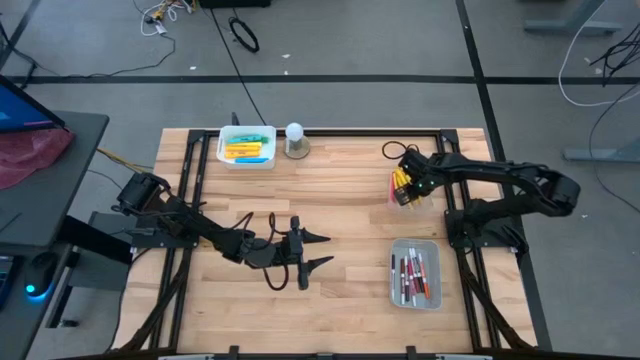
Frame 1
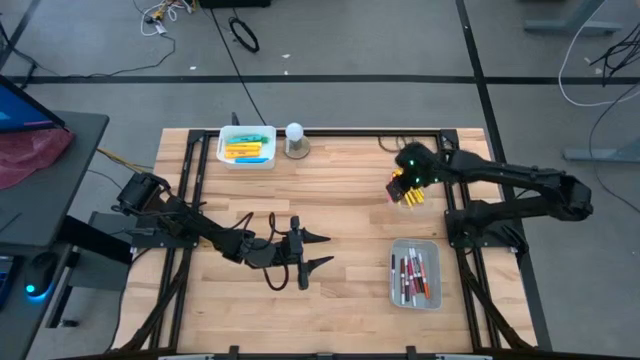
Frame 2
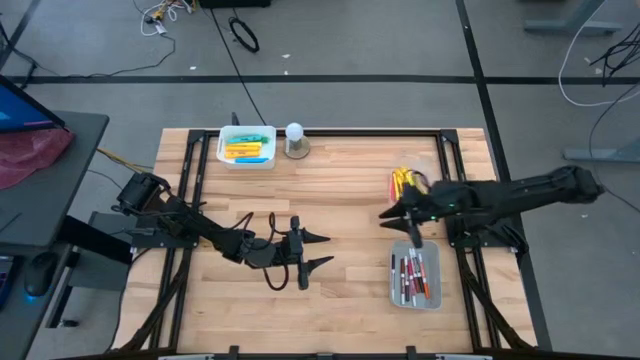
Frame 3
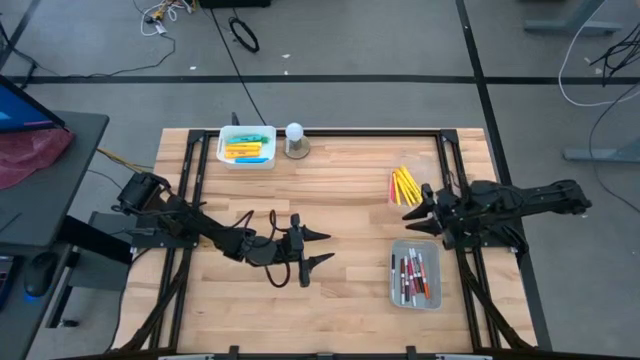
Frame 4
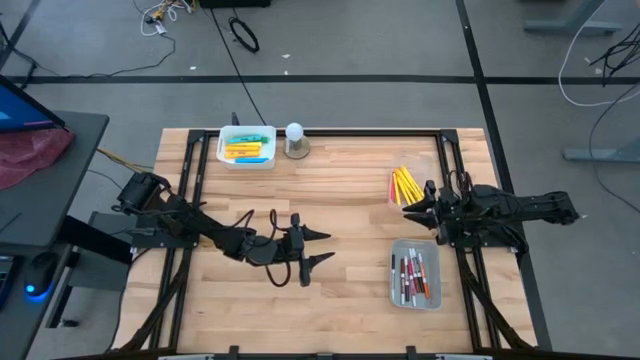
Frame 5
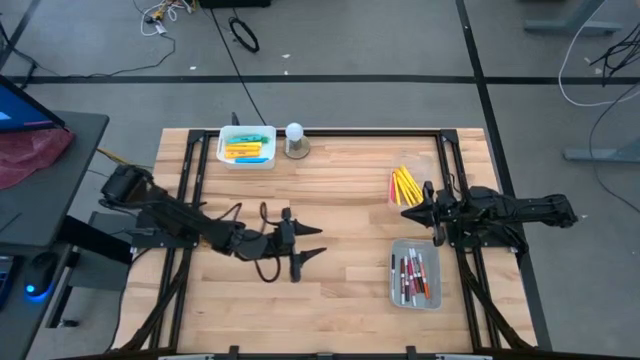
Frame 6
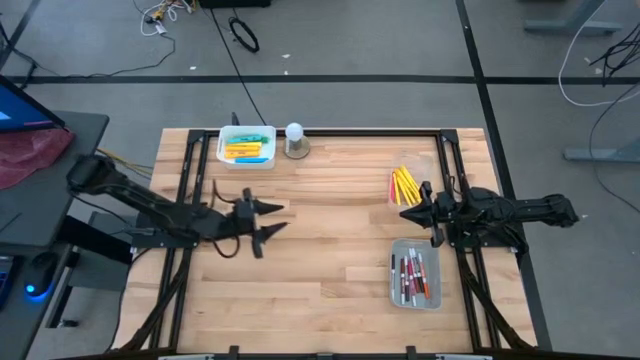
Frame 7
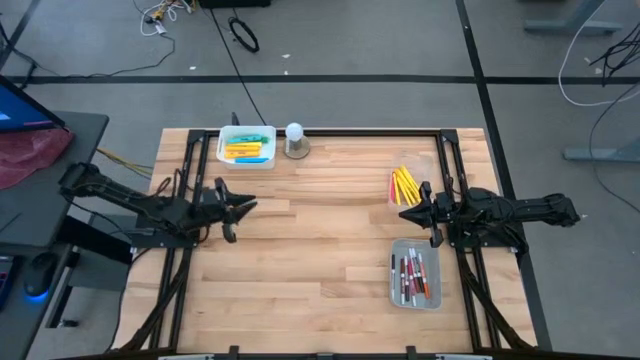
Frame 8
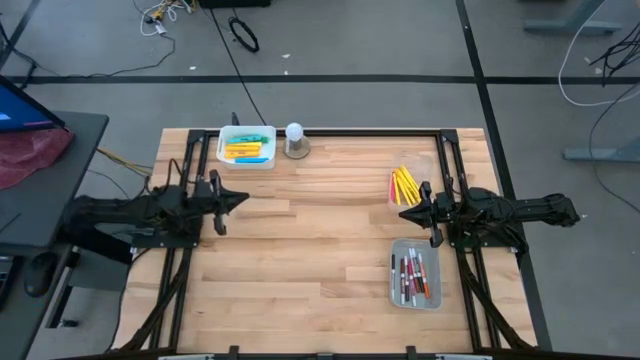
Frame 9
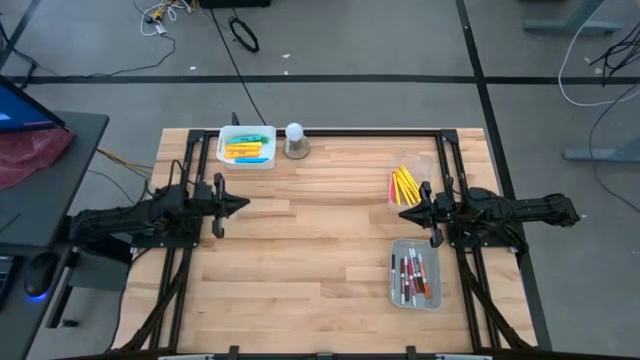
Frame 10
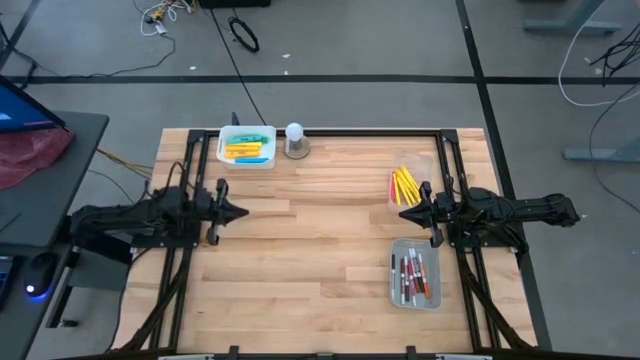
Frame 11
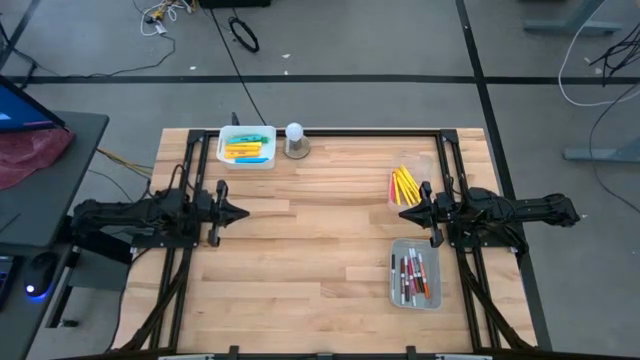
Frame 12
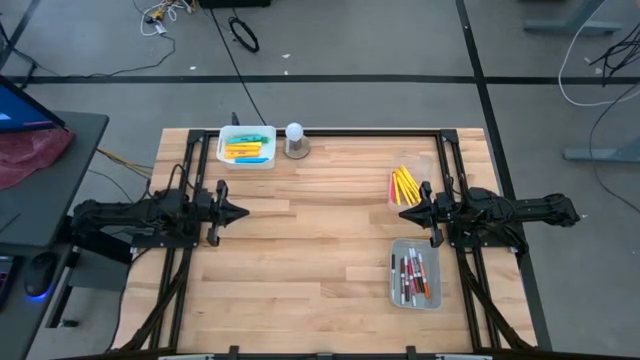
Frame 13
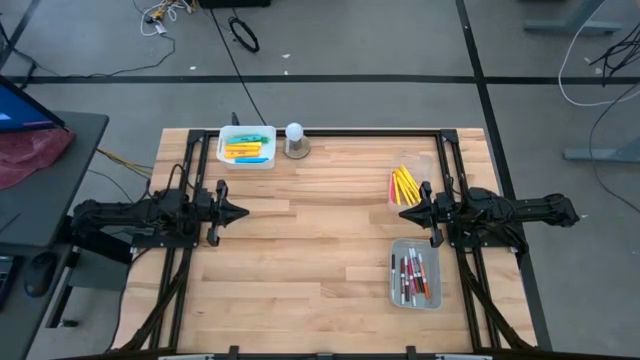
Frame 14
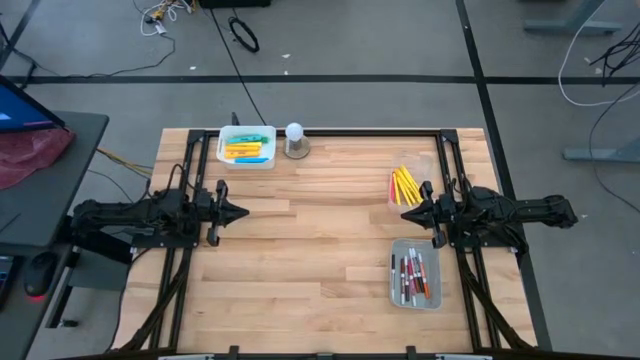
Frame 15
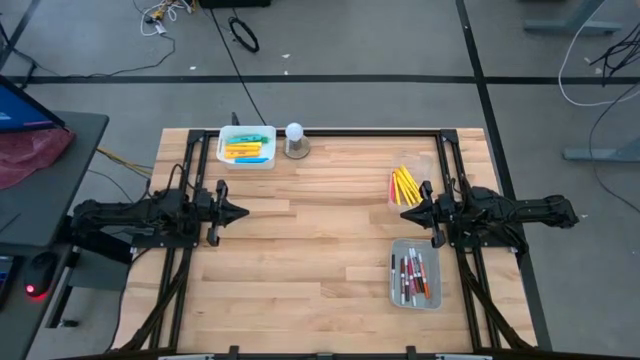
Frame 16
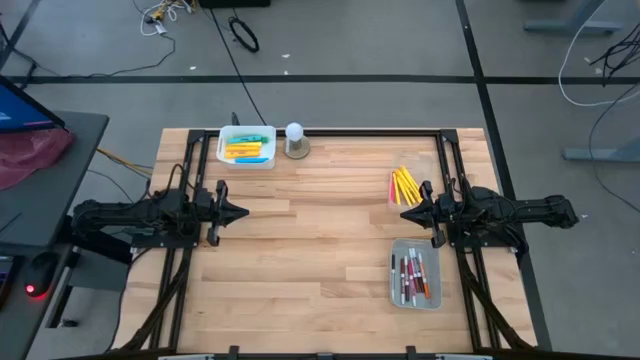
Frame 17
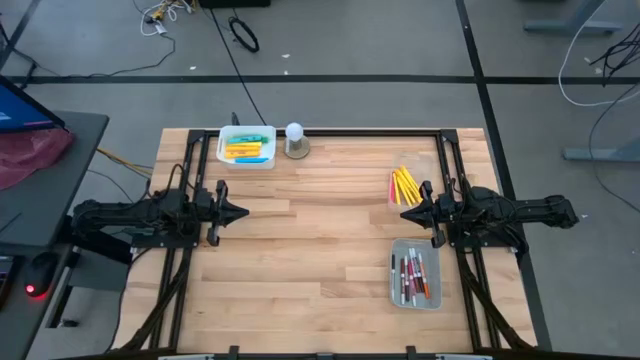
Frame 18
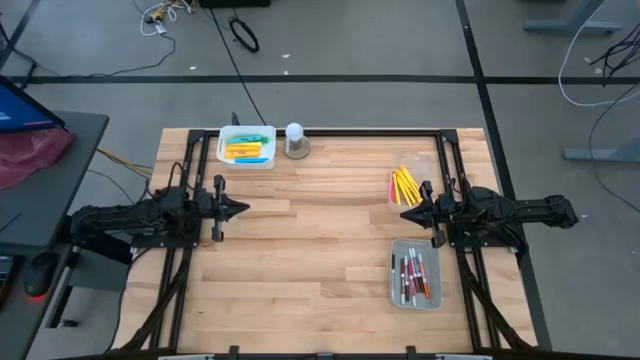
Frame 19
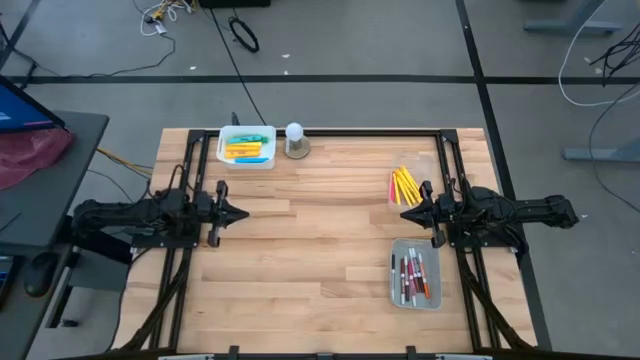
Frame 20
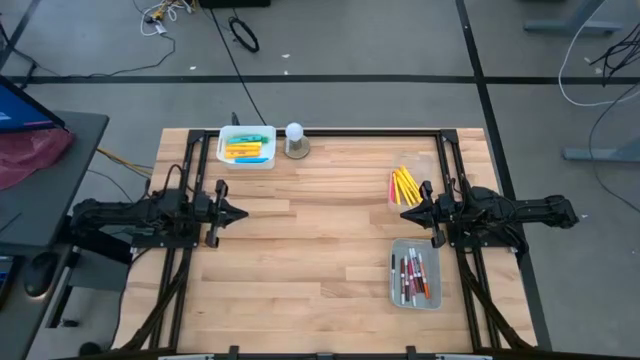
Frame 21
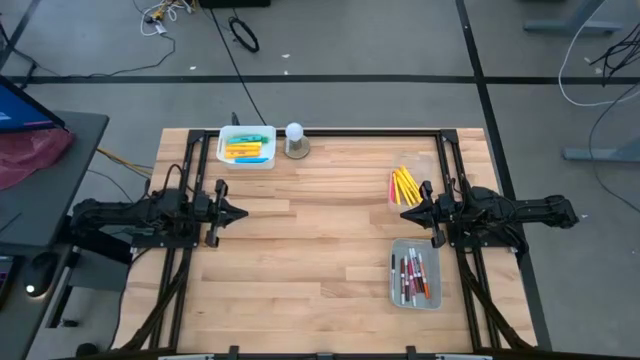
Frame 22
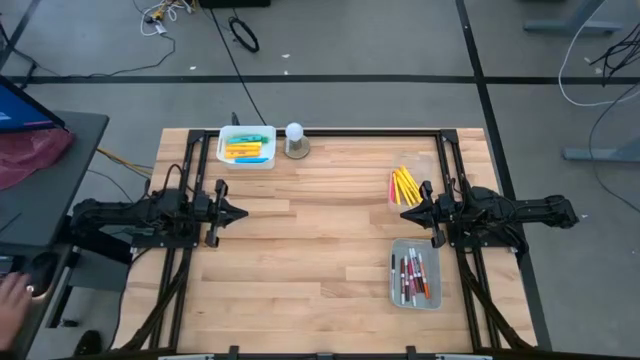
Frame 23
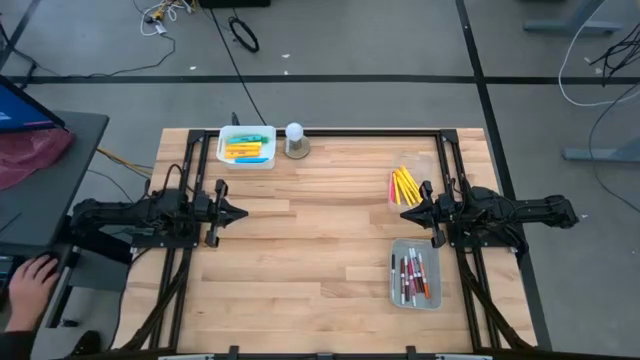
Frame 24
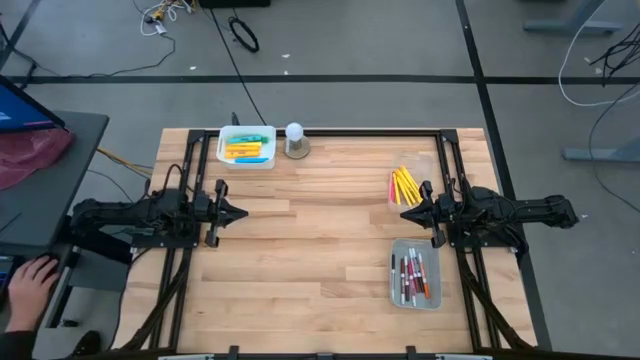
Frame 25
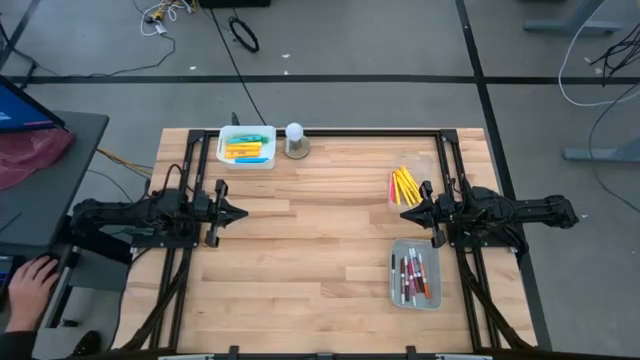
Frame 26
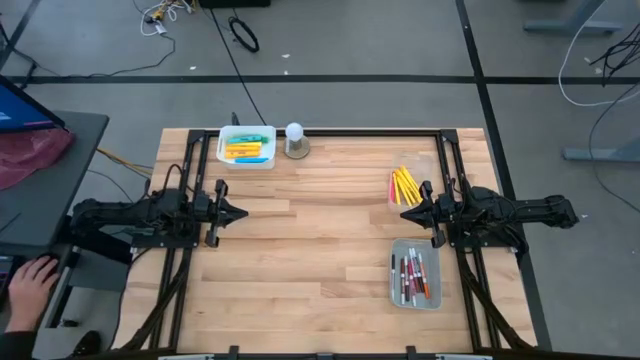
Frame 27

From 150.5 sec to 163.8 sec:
Task: Pick & Place Markers
Return to Home Position

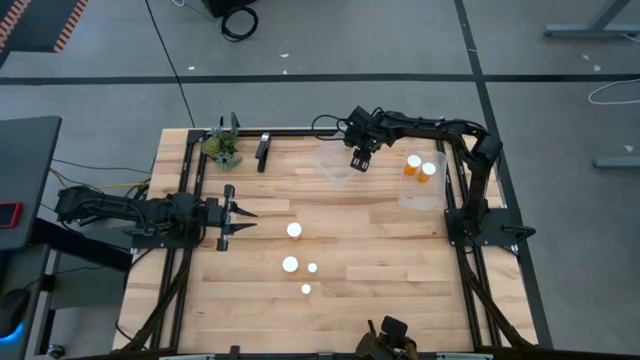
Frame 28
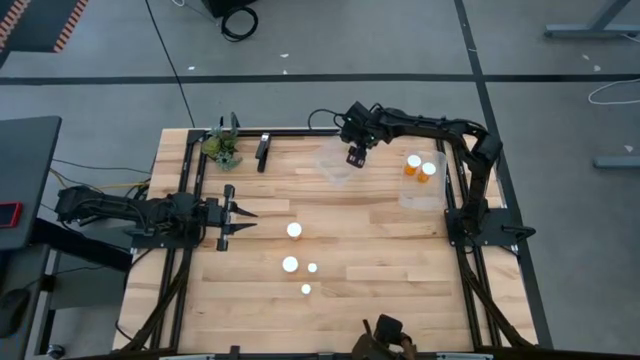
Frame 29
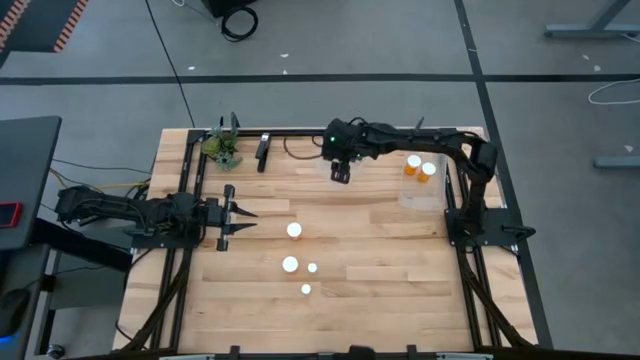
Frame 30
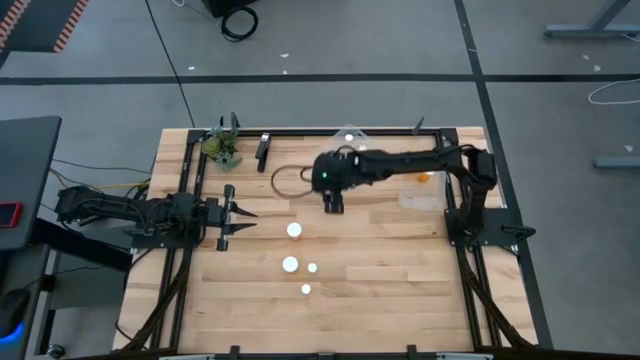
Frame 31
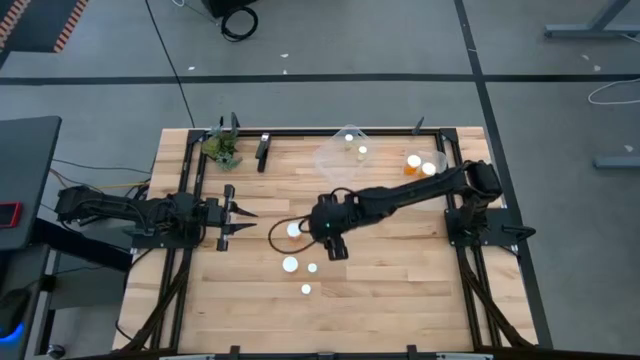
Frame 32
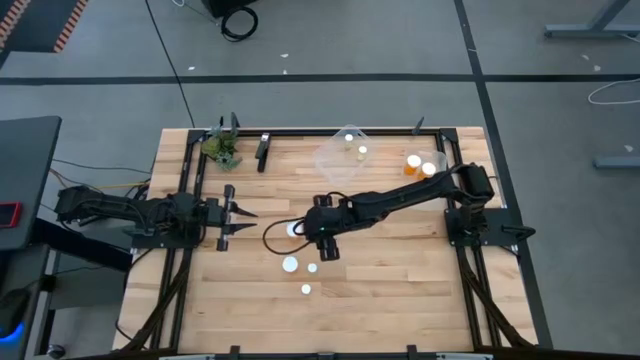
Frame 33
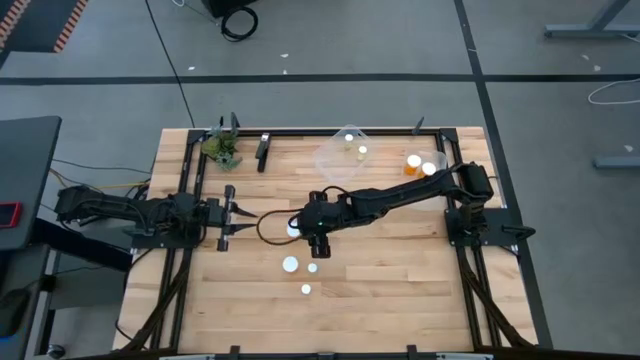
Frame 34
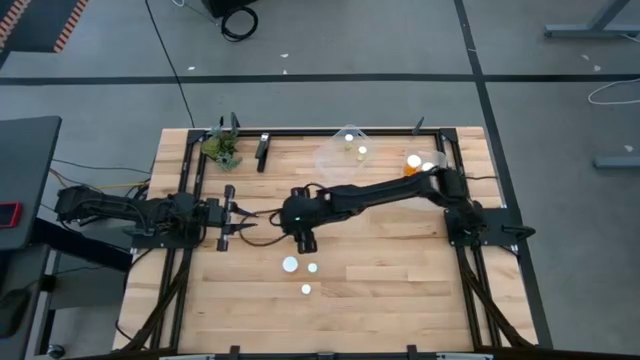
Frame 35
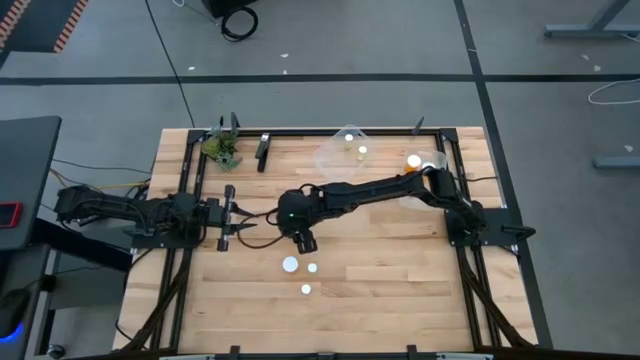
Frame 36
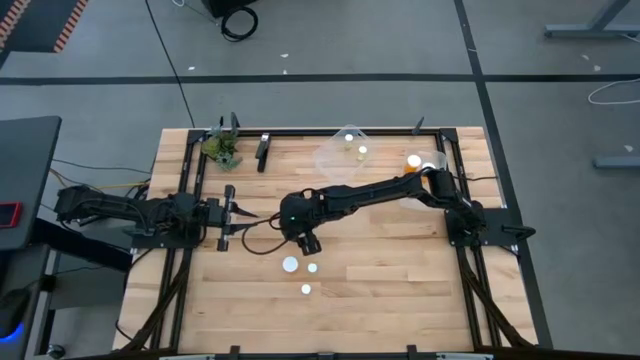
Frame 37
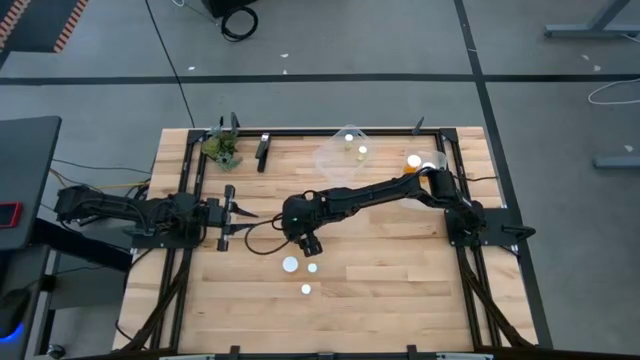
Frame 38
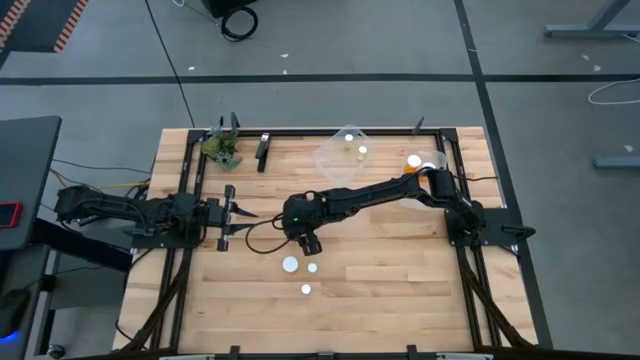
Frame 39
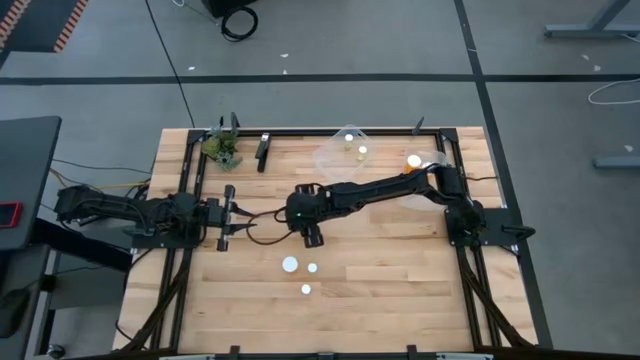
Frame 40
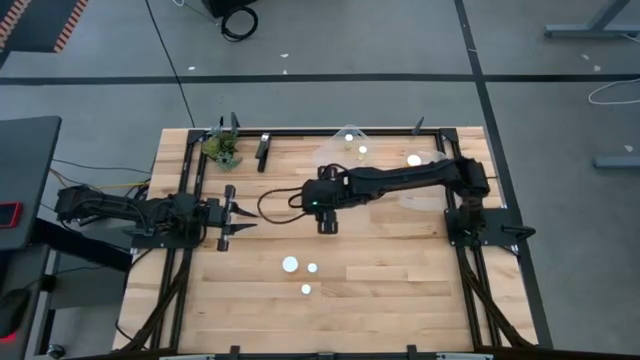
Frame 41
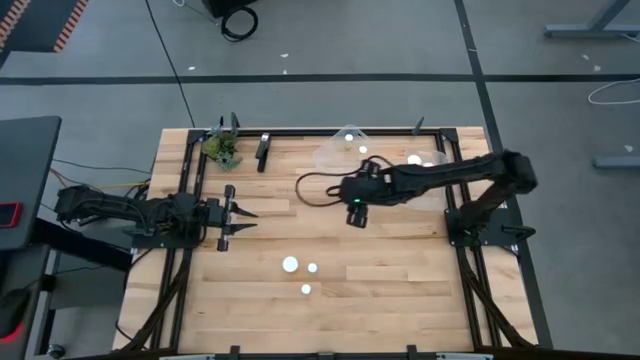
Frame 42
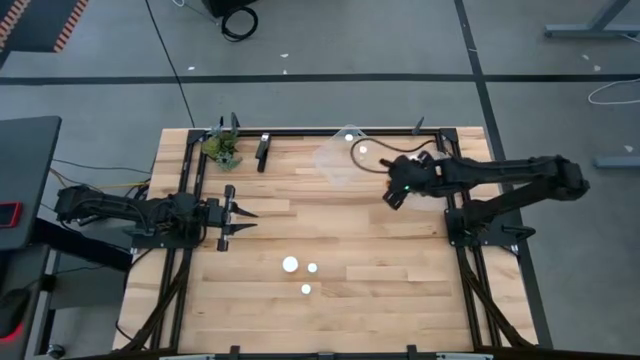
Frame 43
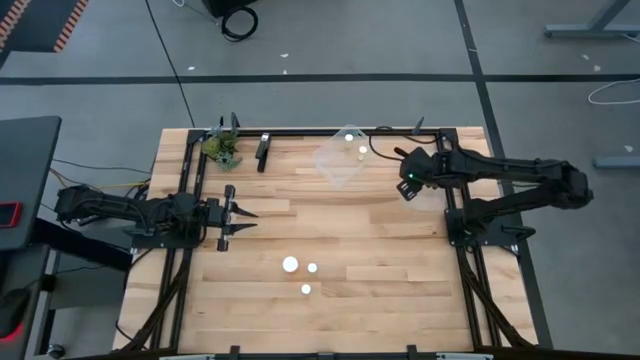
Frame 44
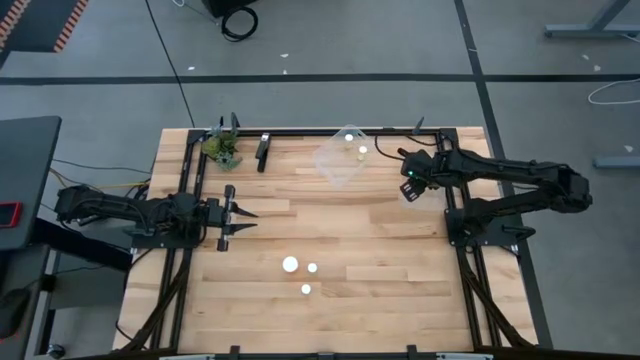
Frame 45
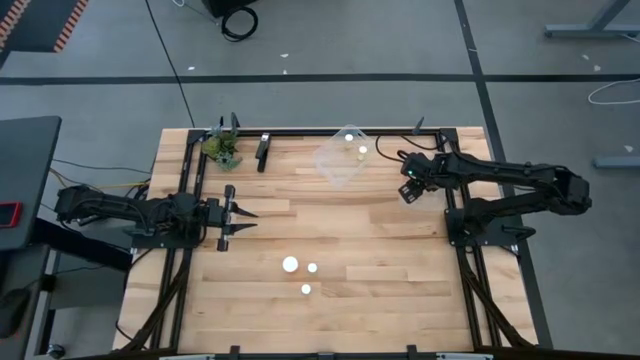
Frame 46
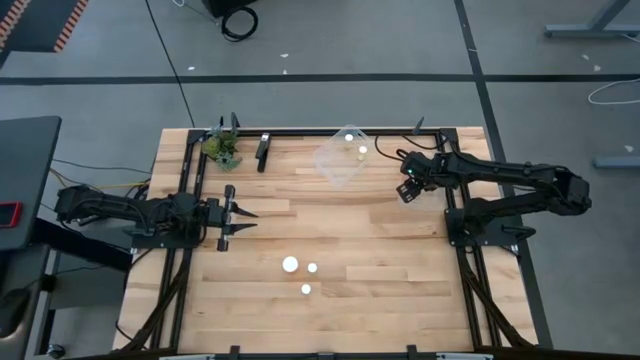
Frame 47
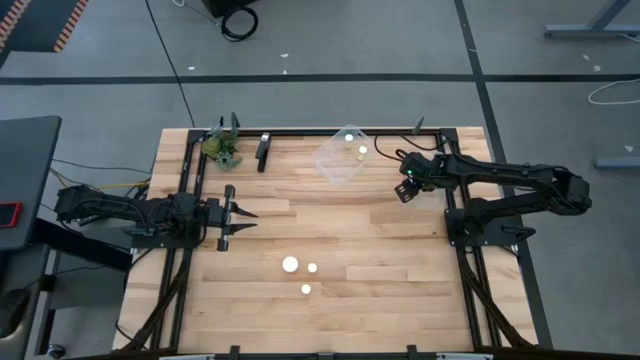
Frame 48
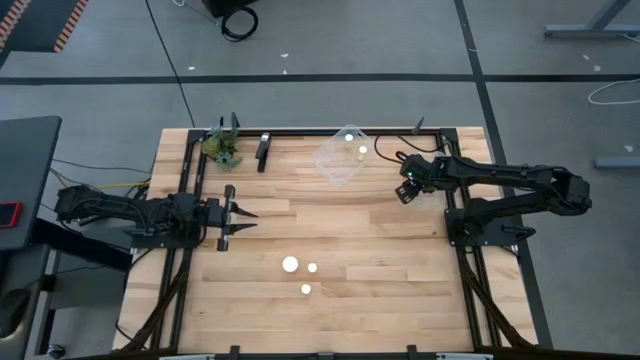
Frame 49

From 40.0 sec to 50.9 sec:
Task: Pick and place medicine bottles into bin by pill shape (circle, oval)
Put the big orange pill bottle into the right transparent bin
